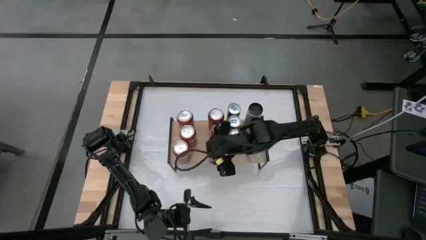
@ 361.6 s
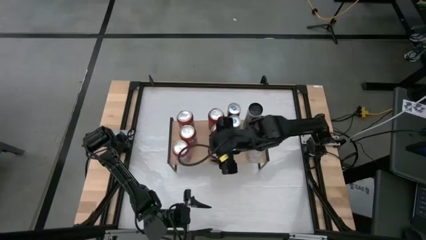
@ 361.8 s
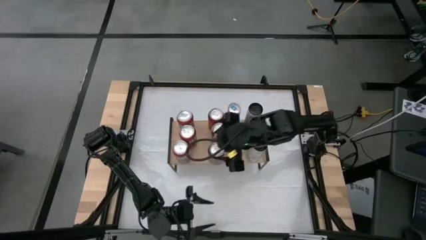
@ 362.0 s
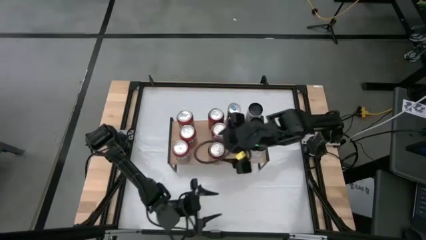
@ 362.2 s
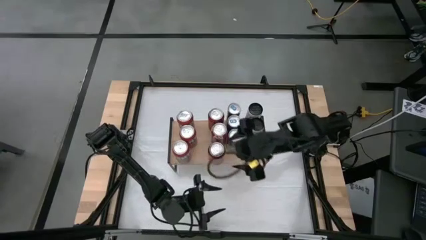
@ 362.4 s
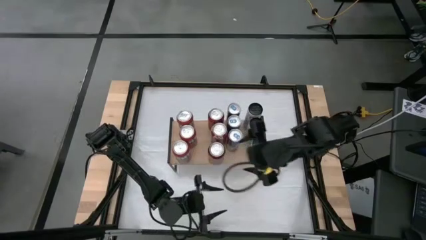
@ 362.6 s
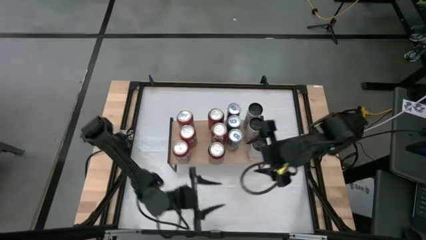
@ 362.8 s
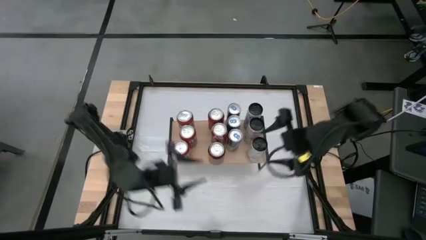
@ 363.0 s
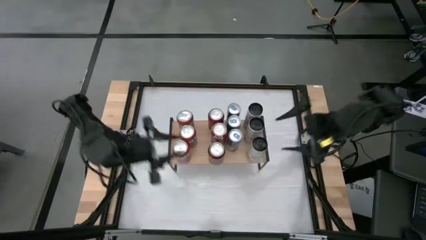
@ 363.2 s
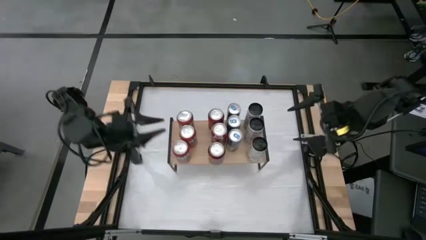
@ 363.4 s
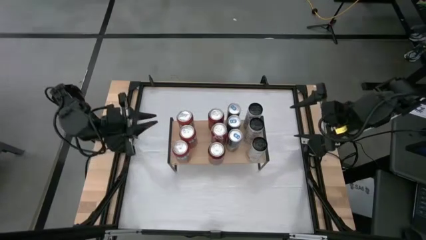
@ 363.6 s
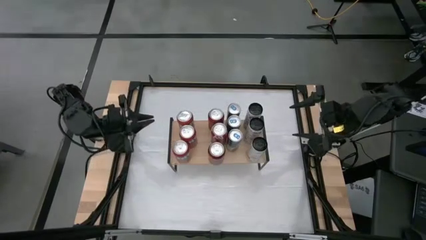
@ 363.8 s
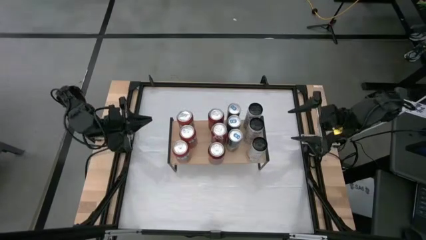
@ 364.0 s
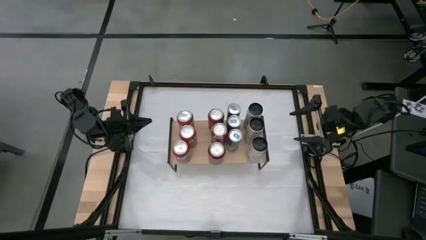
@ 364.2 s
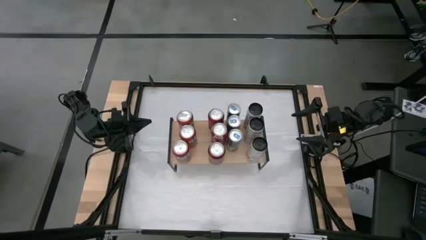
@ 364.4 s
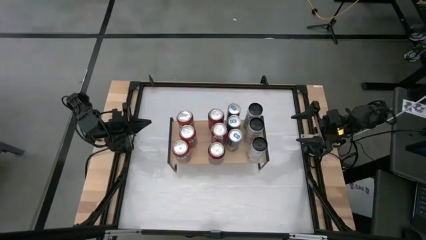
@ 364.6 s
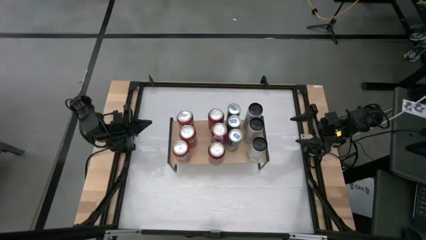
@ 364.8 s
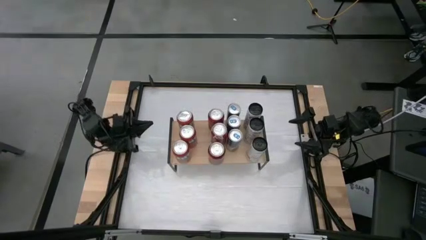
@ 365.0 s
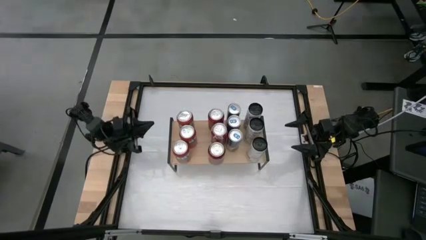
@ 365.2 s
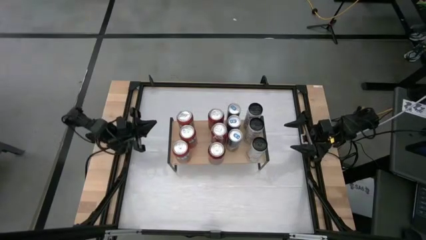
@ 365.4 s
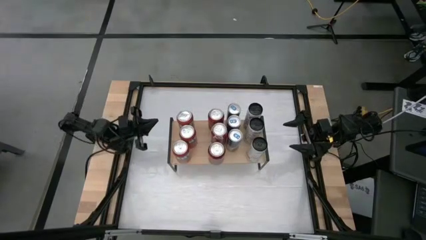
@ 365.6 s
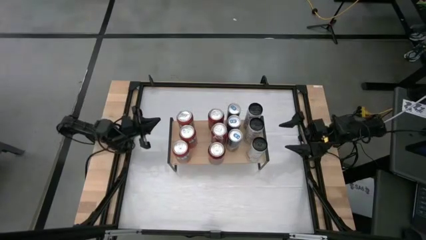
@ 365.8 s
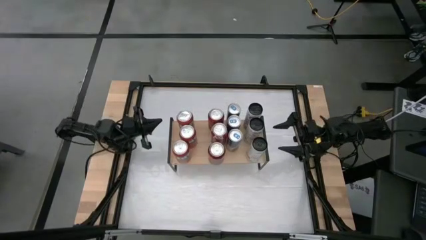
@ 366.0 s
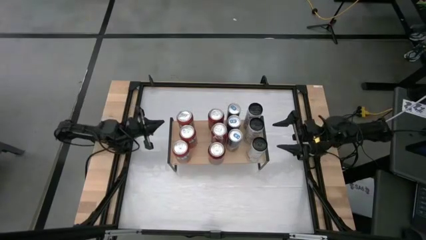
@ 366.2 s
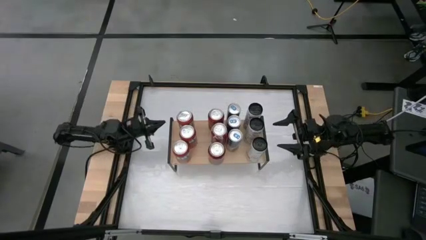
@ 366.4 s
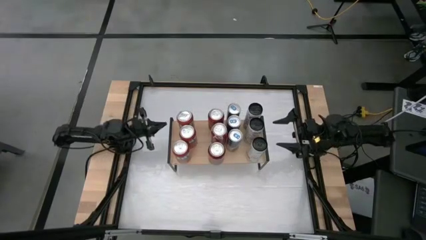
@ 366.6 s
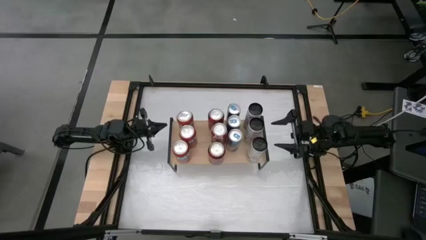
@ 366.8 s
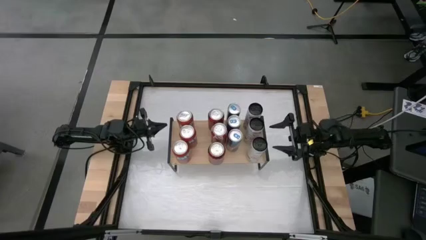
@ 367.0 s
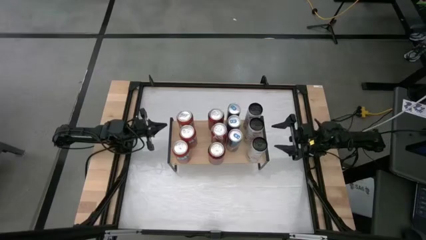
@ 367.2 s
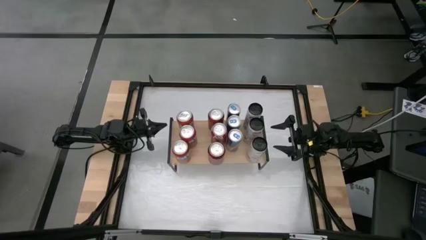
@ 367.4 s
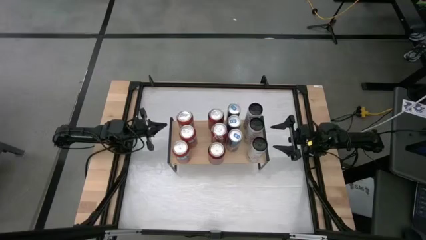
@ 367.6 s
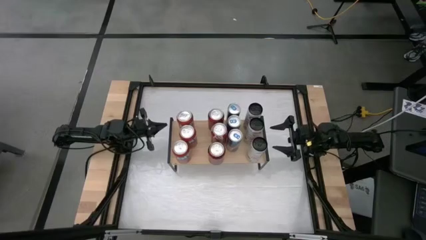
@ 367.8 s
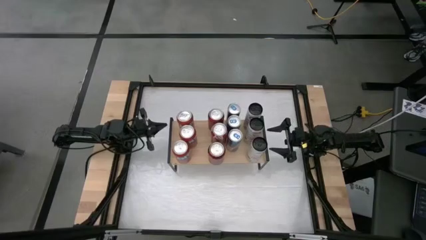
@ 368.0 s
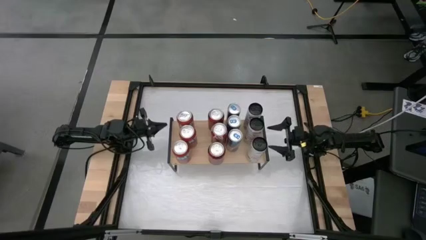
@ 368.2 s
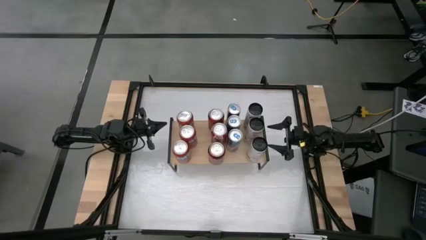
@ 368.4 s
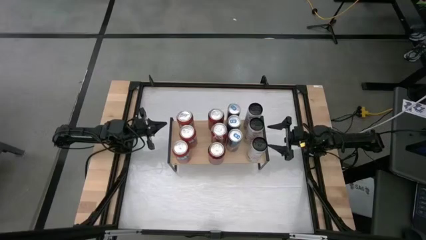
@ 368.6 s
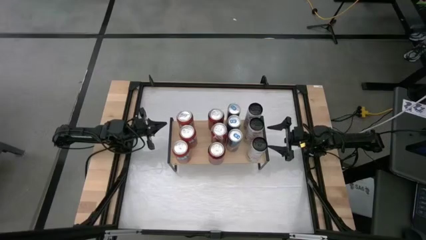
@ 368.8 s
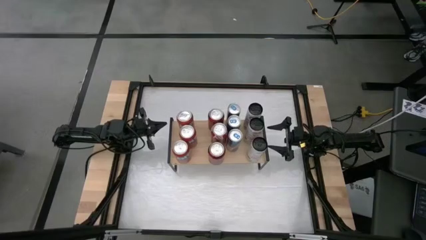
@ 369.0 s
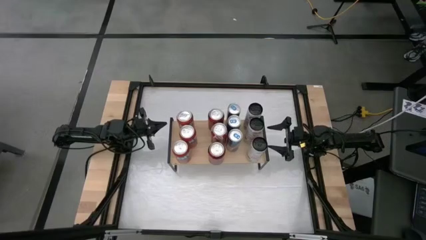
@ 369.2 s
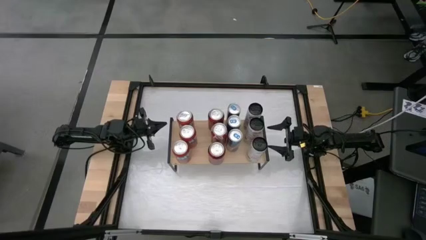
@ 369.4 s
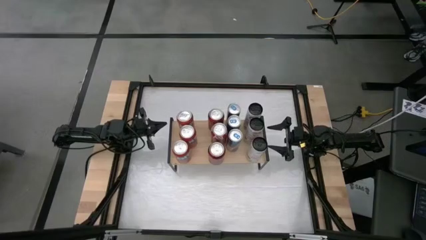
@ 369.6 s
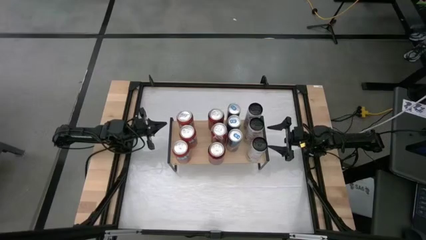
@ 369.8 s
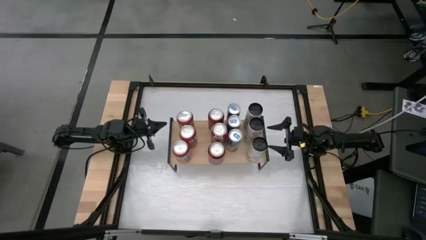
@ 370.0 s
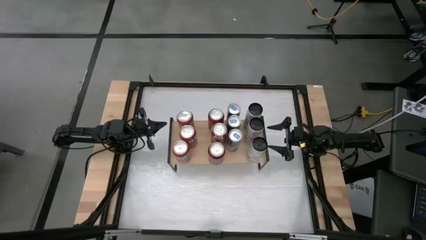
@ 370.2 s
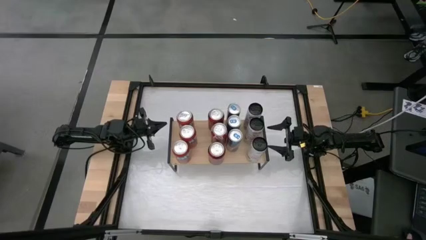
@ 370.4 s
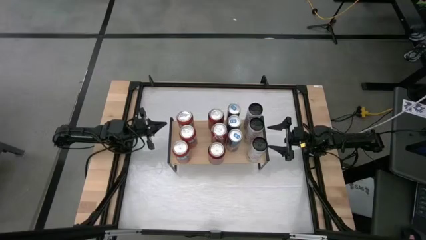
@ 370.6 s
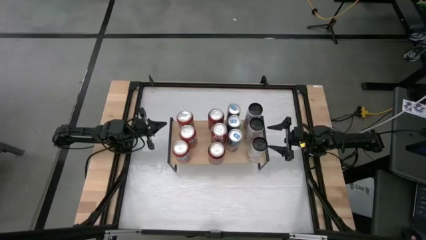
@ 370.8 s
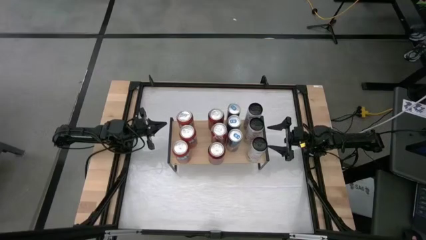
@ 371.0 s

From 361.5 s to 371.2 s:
Task: Place canned beverage on shelf
Return to Home Position

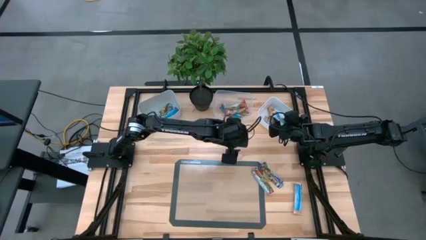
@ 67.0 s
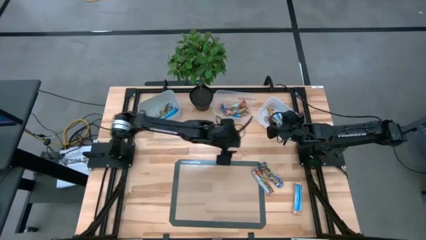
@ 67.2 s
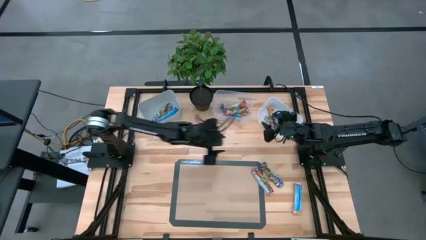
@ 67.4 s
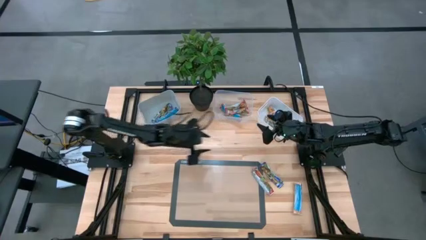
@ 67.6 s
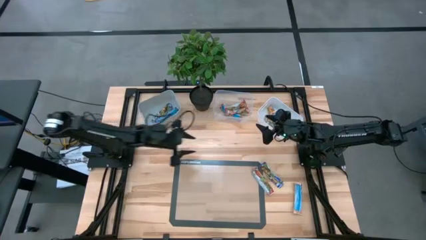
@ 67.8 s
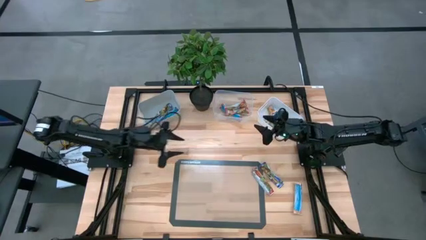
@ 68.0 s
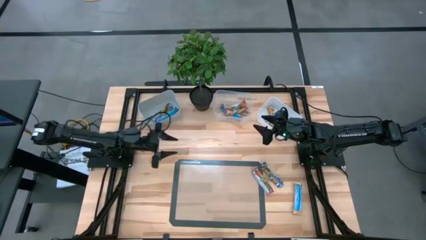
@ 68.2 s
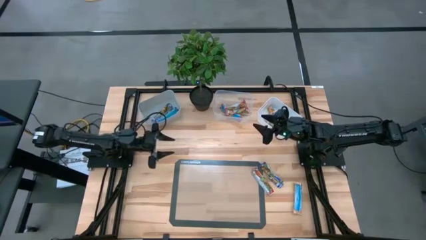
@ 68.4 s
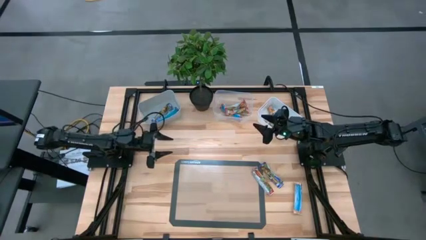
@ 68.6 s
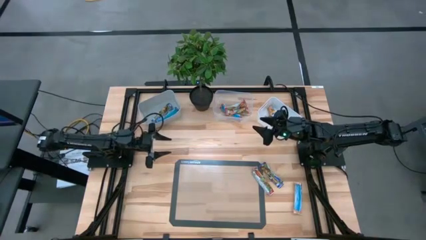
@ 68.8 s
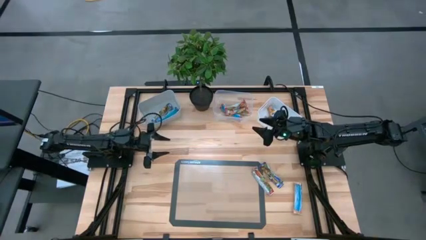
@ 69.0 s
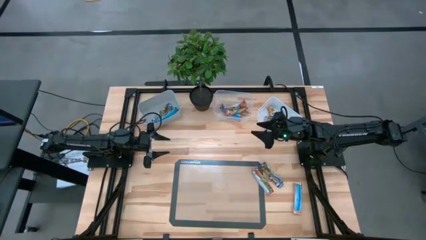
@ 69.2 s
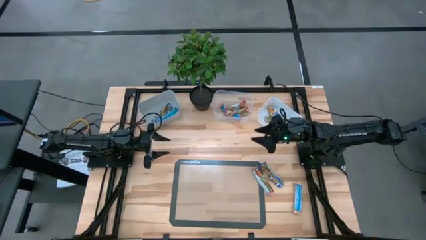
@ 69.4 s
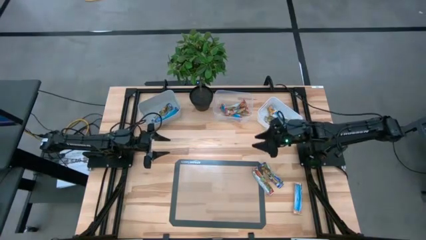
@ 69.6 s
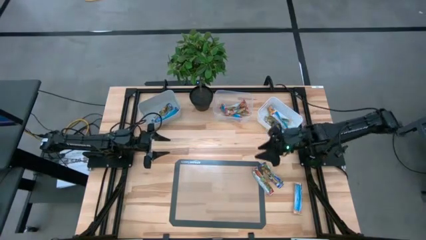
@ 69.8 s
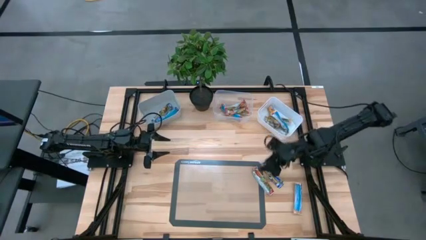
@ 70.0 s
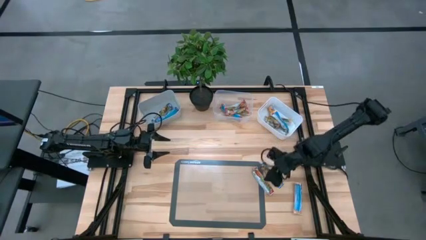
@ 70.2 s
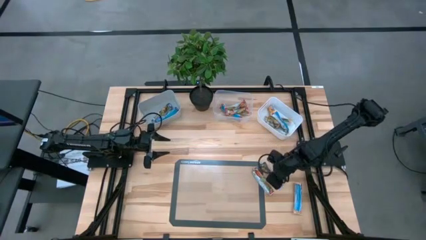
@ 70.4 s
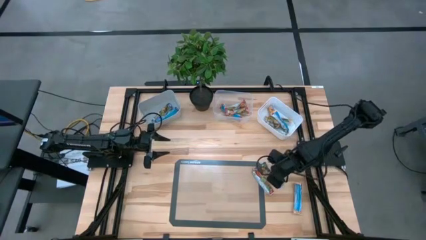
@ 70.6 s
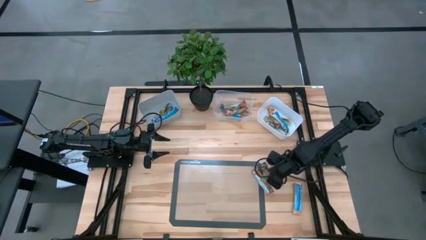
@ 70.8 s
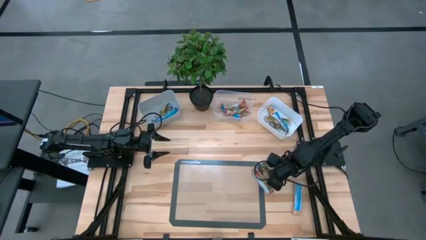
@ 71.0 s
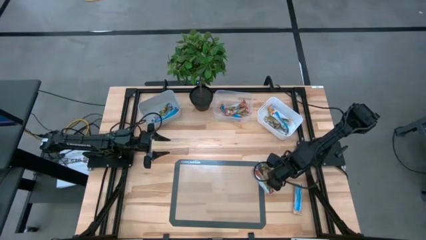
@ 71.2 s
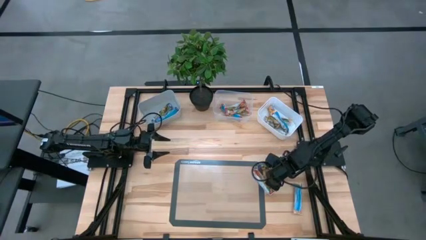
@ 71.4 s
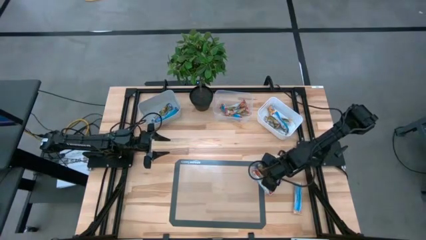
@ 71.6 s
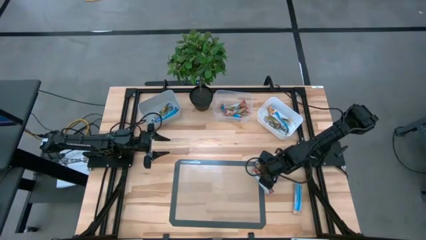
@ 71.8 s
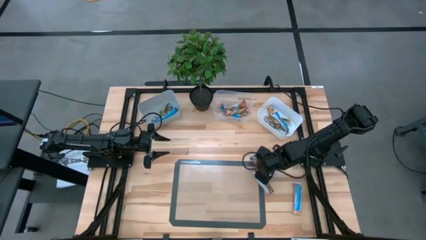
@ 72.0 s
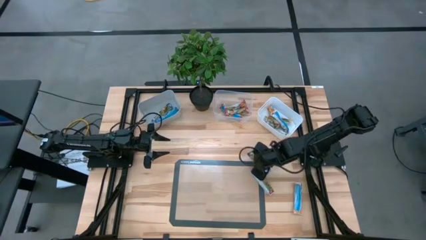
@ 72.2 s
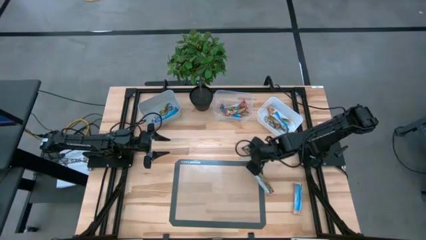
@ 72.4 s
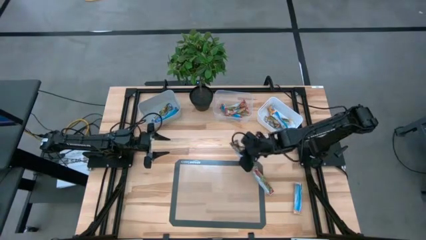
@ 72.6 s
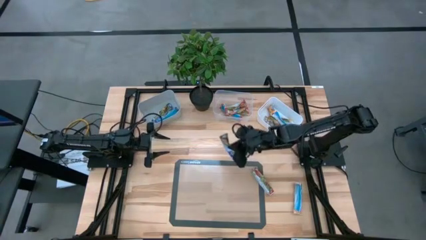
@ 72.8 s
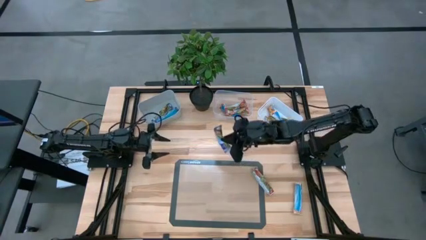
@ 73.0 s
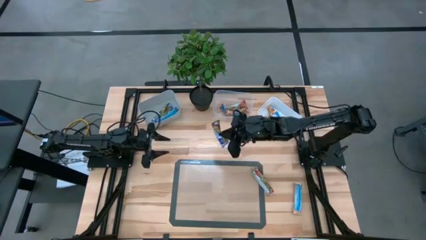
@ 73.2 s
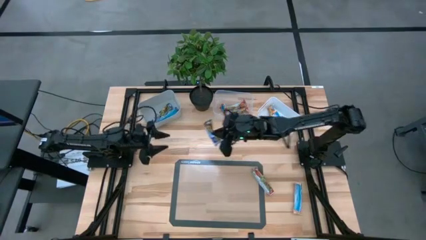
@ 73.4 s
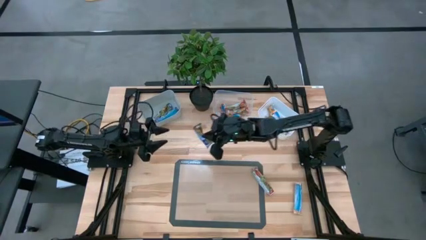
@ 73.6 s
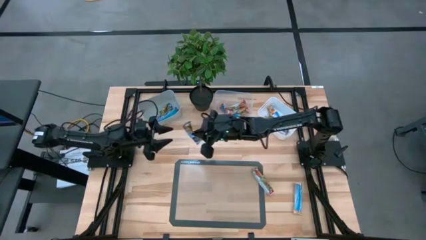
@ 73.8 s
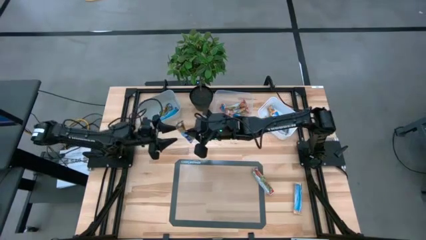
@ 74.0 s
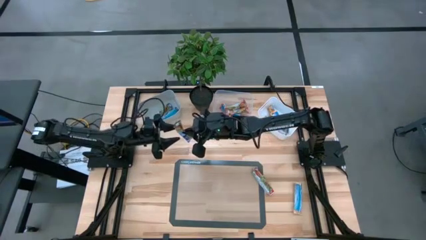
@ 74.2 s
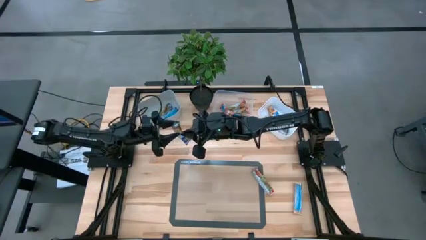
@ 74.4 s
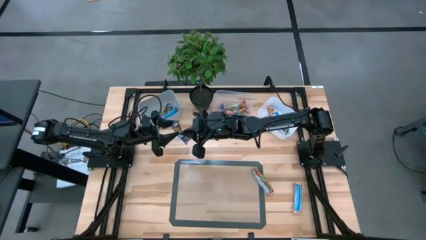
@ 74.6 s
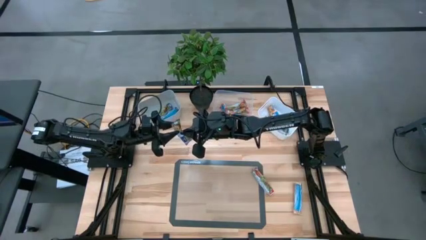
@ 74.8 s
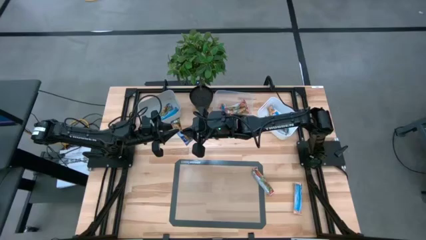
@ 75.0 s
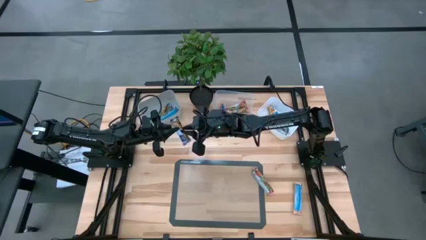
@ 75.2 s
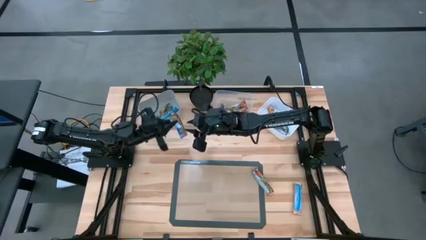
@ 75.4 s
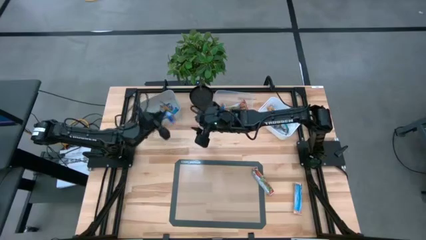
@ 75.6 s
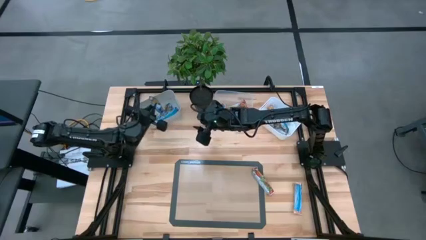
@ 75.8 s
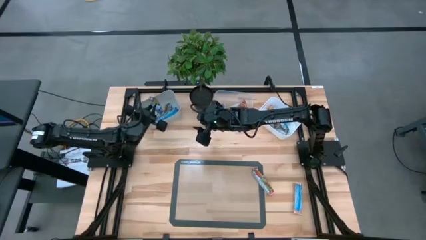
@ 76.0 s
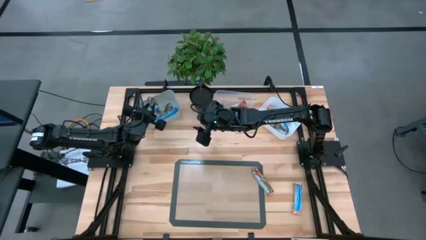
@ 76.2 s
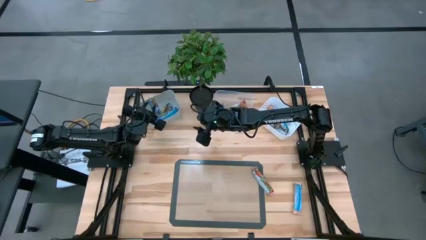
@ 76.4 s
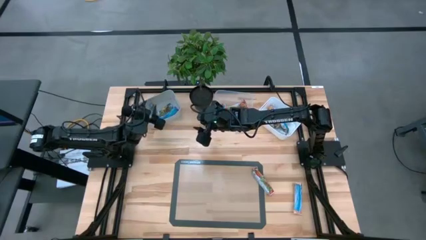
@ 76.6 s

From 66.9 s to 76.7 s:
Task: Pick and place Granola Bars by type
Put the blue granola bar into the gray bin
